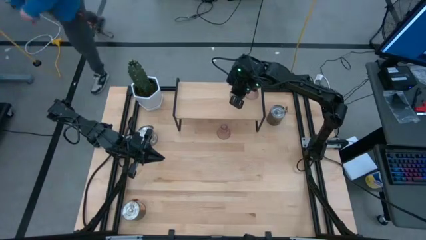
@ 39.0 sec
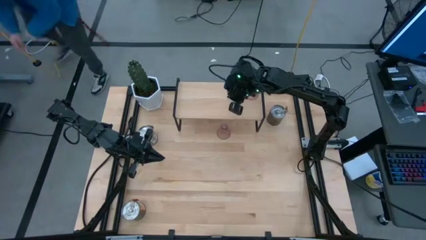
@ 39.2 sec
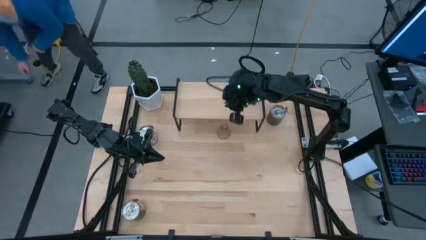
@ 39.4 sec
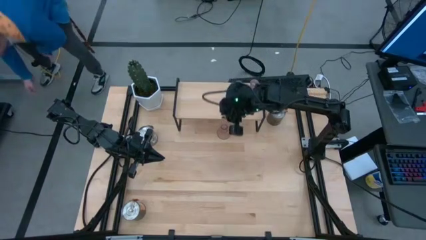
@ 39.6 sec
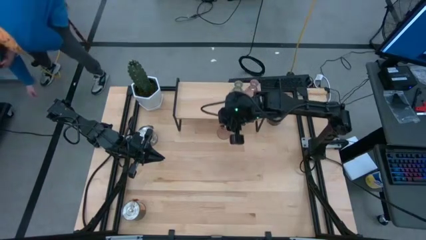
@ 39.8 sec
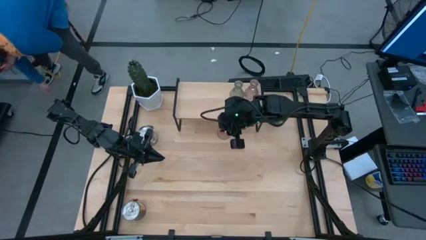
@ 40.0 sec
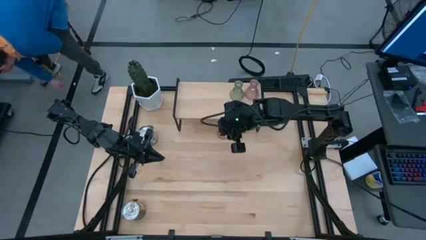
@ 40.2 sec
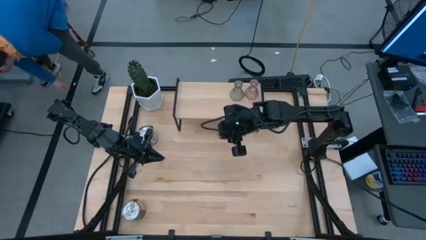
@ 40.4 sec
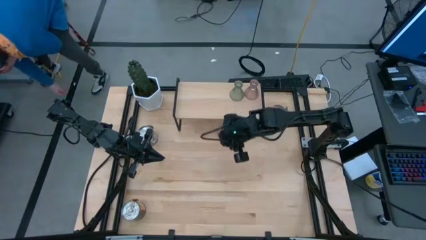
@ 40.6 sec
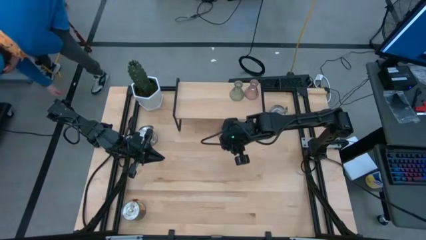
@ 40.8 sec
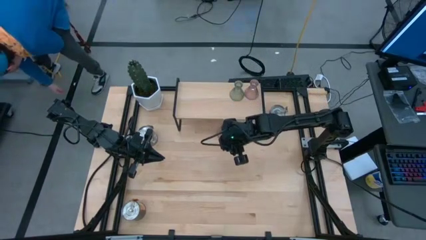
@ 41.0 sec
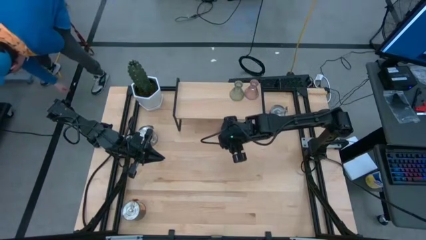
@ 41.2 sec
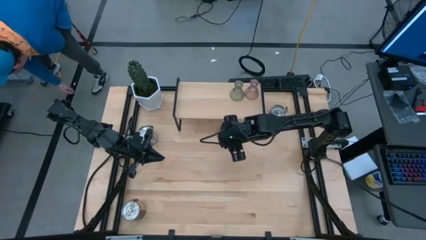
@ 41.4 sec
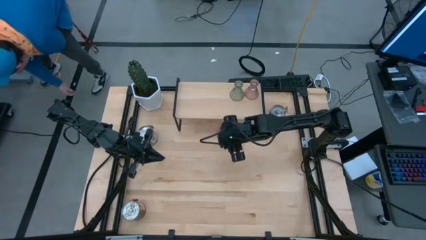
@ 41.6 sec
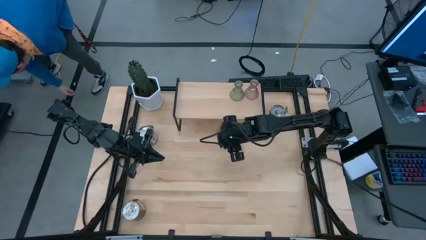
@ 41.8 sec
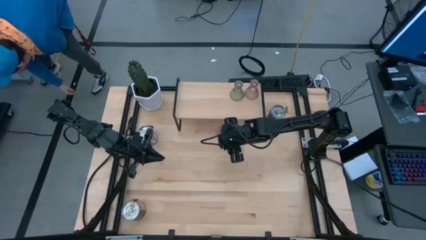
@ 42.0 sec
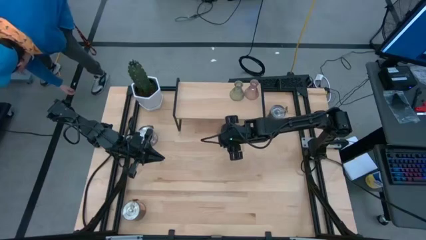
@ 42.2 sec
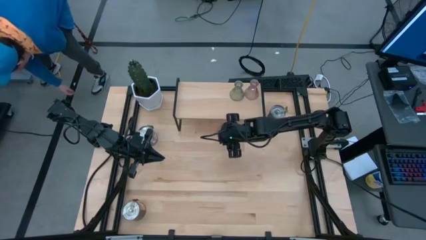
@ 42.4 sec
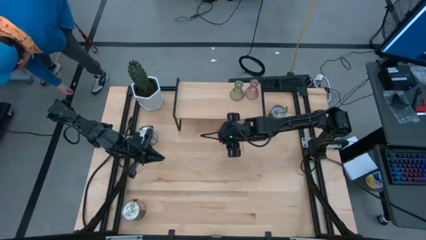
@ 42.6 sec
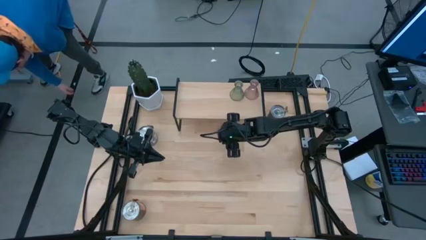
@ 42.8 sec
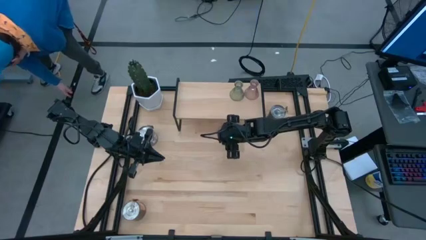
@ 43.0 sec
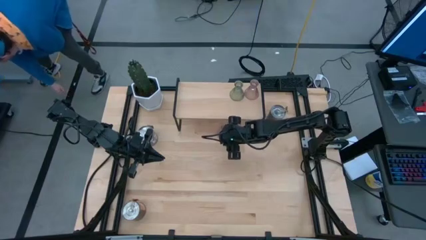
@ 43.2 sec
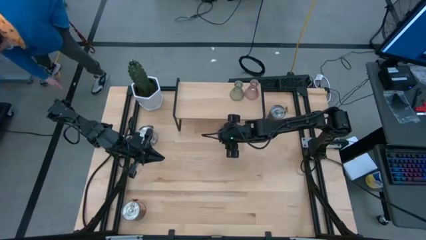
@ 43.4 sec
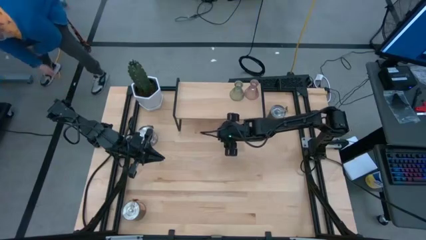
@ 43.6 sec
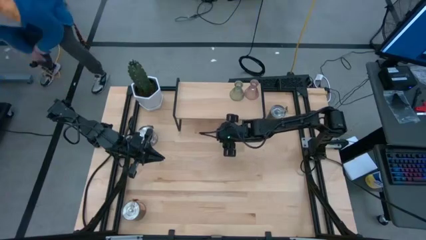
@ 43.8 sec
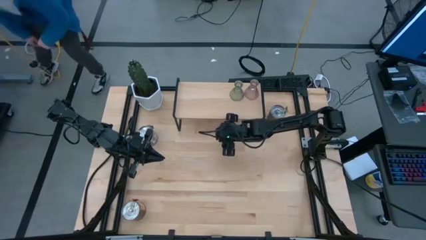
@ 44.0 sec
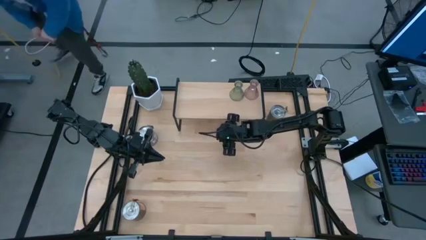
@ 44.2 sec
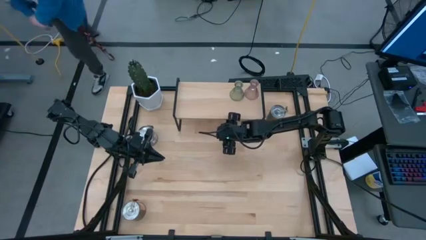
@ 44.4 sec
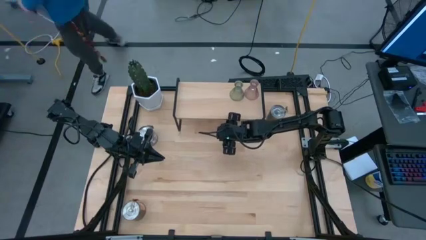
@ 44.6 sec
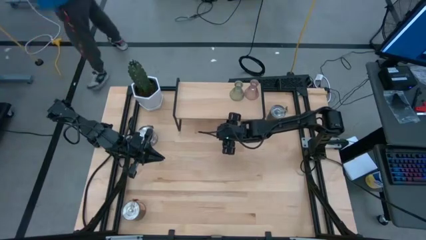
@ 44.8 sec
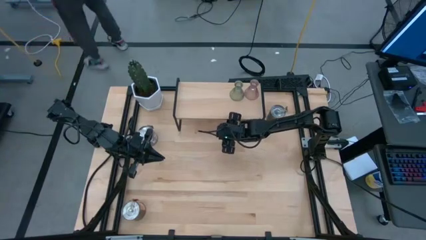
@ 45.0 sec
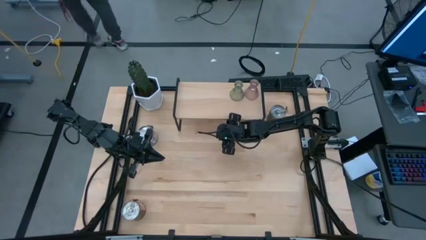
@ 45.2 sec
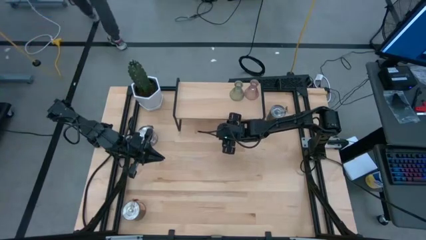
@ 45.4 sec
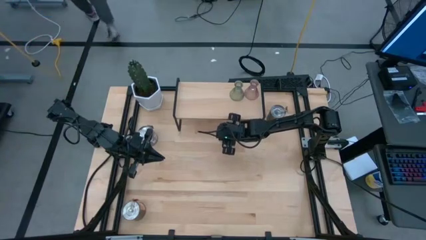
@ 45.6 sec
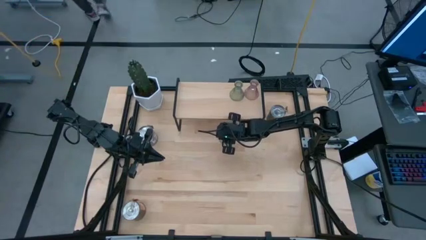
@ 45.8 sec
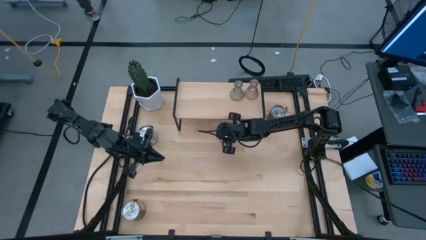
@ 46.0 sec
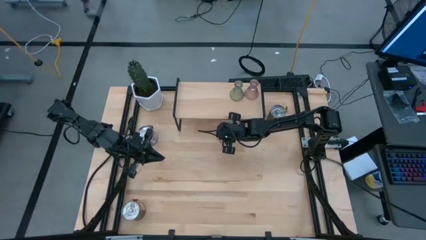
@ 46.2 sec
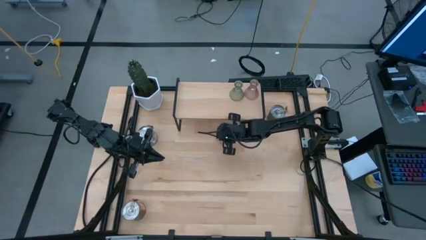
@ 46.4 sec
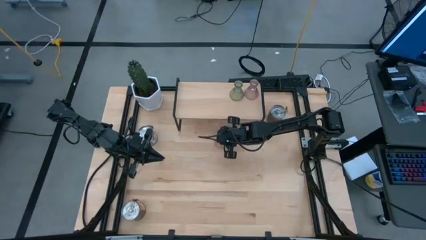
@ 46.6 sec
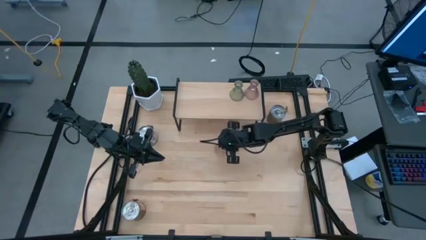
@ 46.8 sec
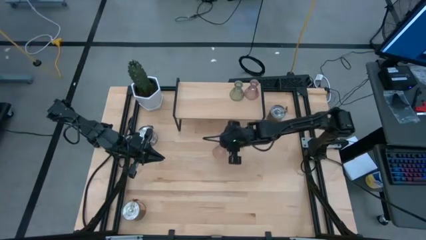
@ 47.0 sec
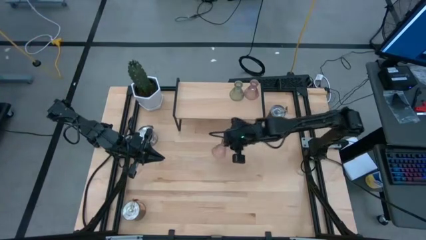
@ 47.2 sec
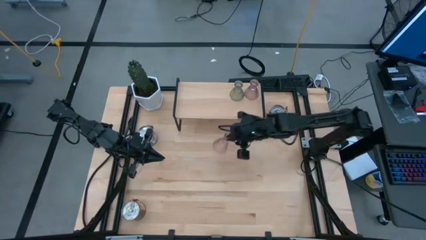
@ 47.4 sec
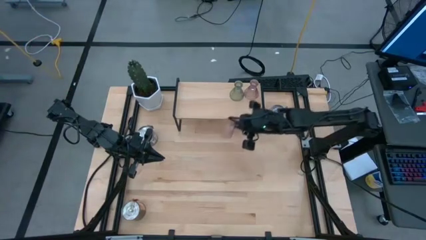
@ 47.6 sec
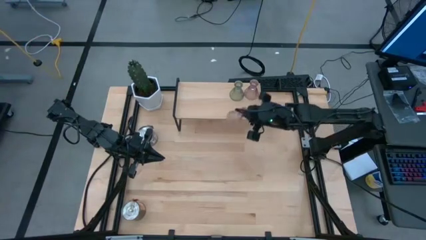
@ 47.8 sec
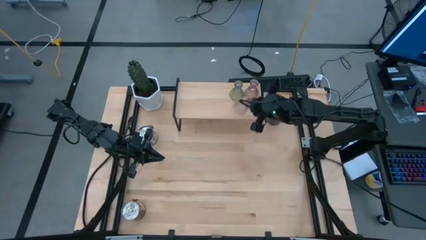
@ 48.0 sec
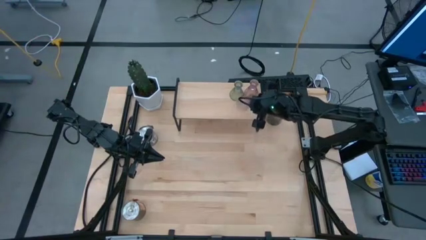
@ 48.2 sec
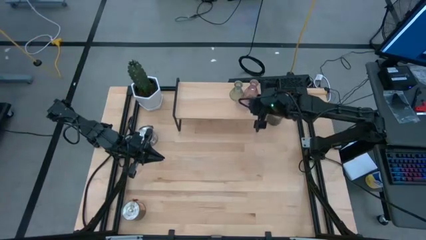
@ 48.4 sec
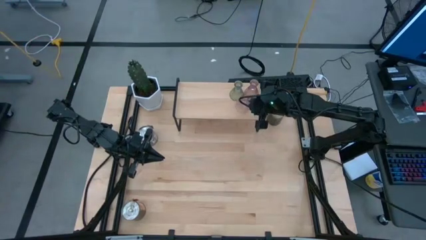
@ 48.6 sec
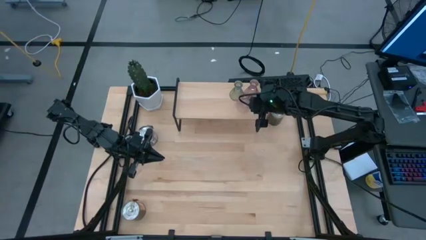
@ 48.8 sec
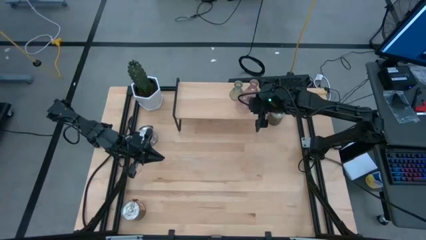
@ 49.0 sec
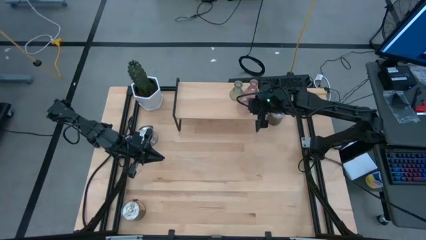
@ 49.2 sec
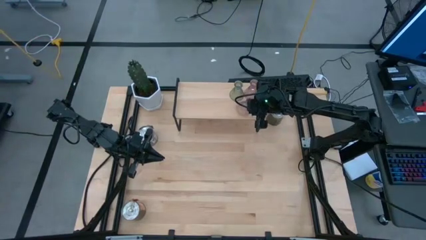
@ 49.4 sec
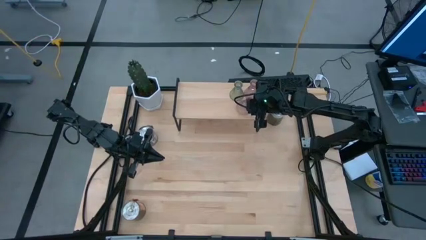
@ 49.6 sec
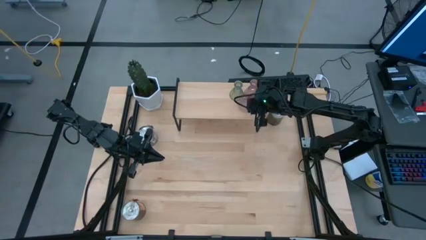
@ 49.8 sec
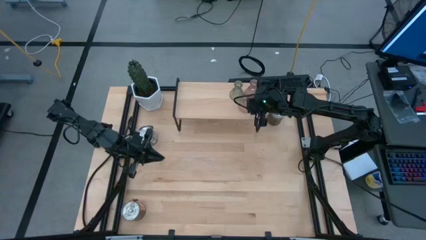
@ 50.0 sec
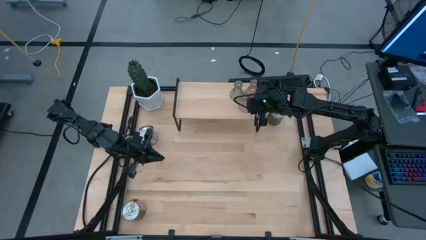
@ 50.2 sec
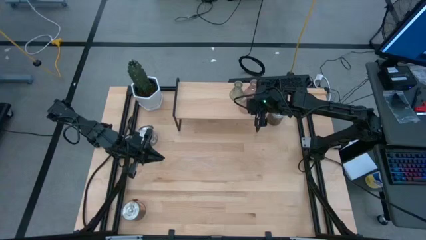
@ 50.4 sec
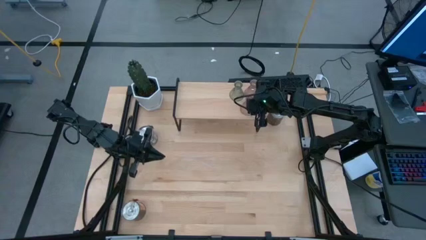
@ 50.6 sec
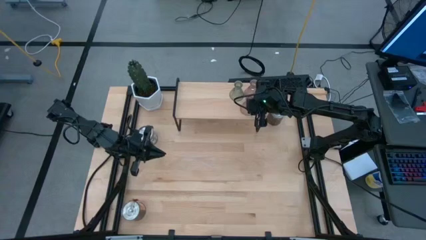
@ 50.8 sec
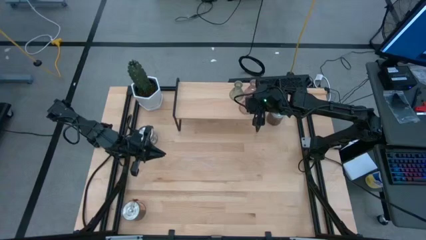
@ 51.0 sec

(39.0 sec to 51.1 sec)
Task: Pick & Place candle stick holders
Put the pink scented candle on the shelf
